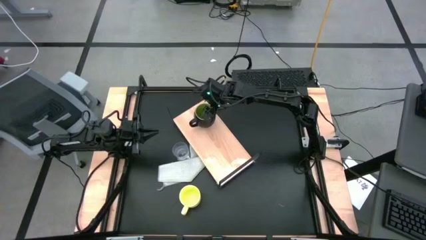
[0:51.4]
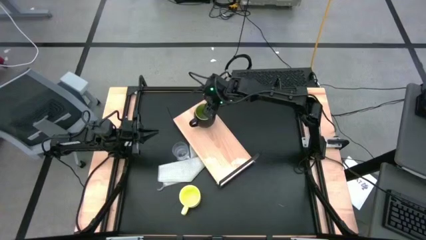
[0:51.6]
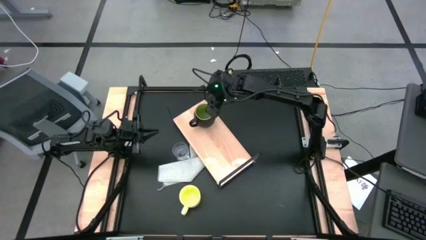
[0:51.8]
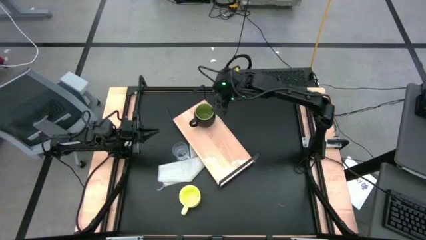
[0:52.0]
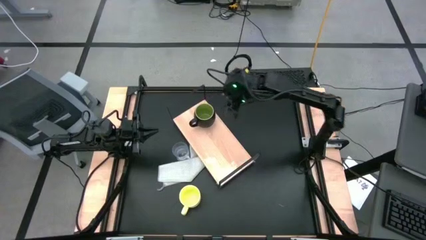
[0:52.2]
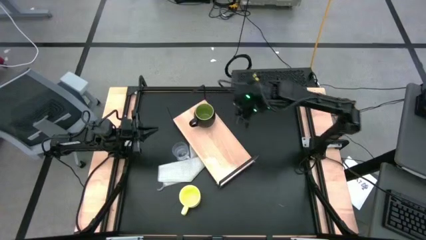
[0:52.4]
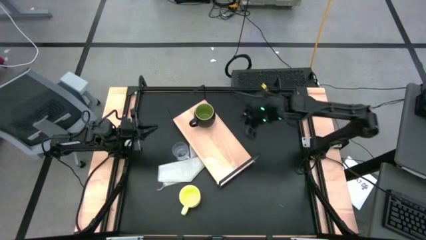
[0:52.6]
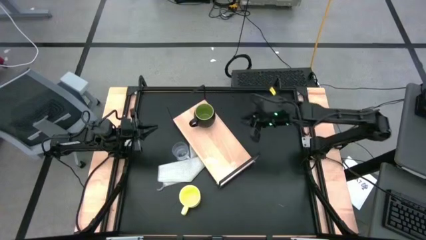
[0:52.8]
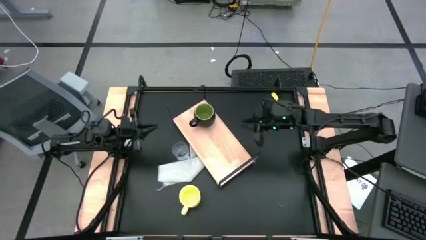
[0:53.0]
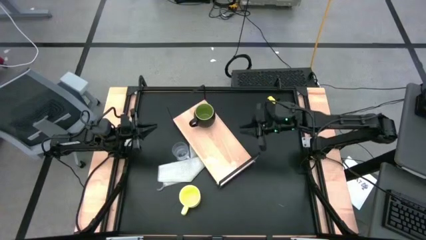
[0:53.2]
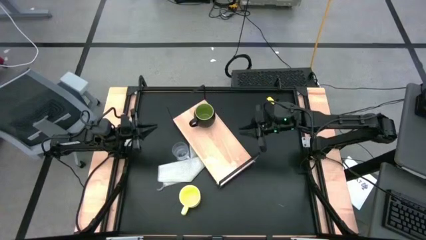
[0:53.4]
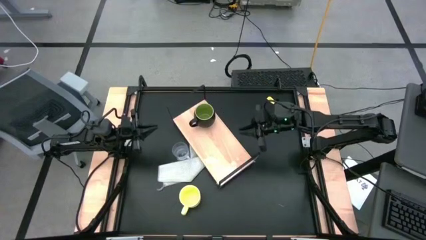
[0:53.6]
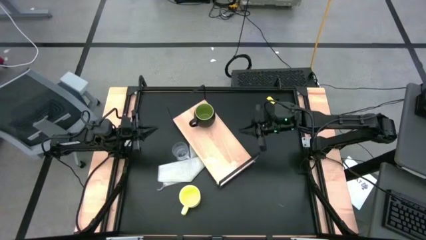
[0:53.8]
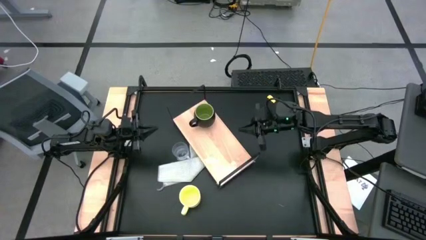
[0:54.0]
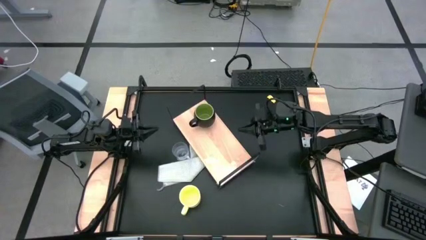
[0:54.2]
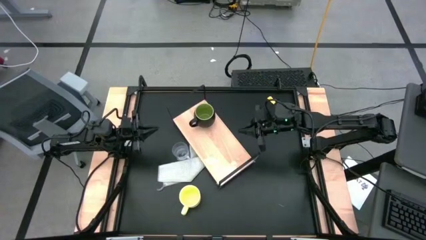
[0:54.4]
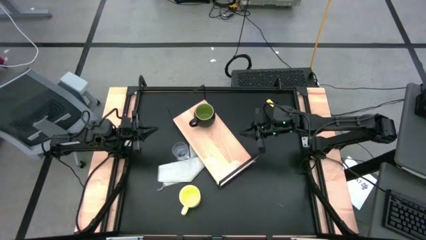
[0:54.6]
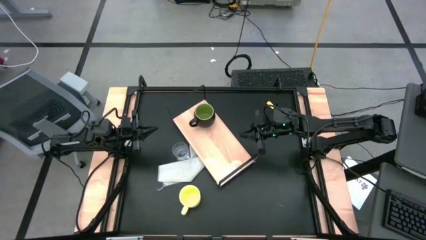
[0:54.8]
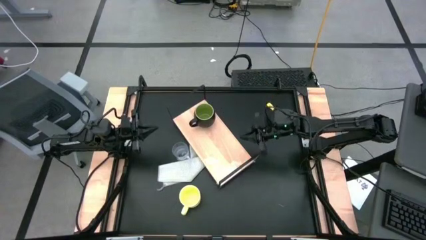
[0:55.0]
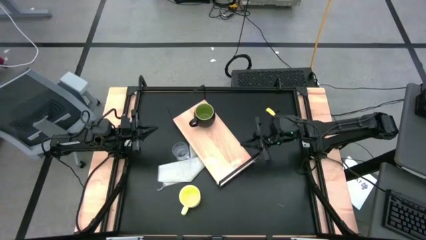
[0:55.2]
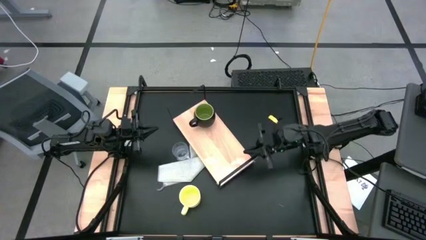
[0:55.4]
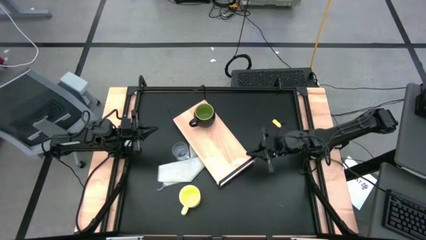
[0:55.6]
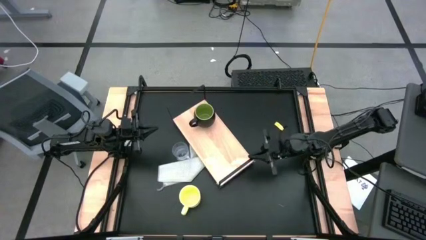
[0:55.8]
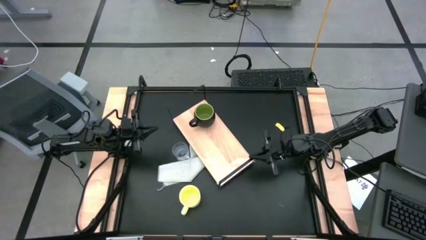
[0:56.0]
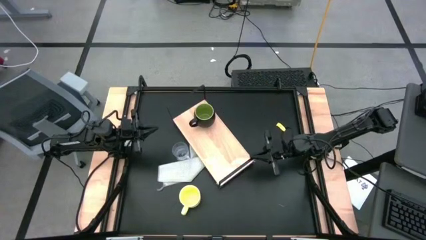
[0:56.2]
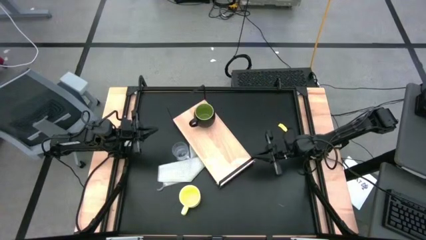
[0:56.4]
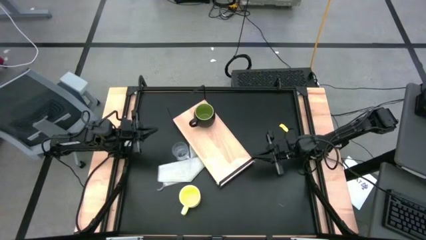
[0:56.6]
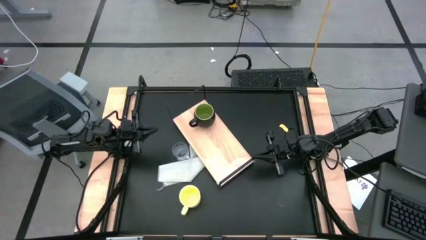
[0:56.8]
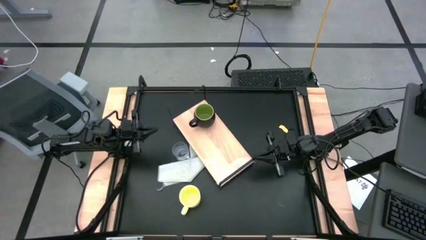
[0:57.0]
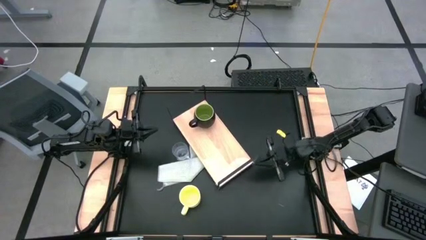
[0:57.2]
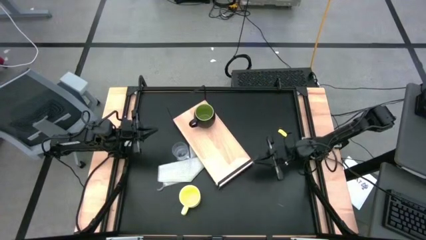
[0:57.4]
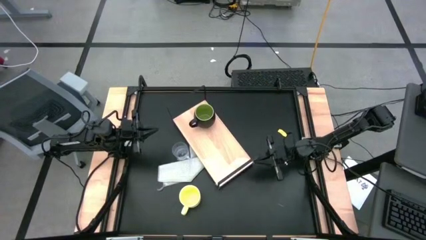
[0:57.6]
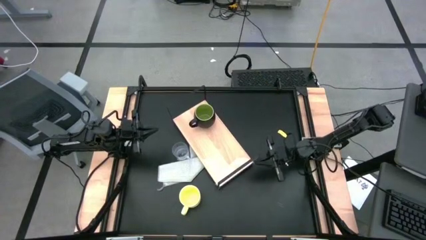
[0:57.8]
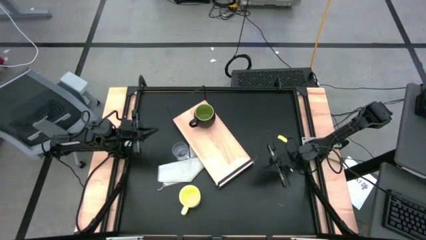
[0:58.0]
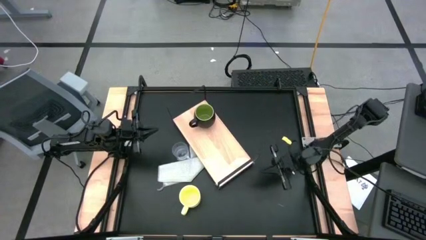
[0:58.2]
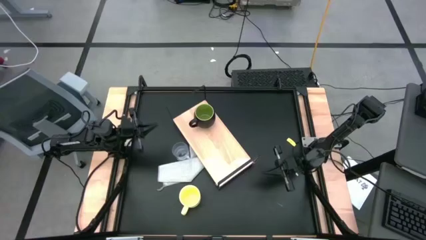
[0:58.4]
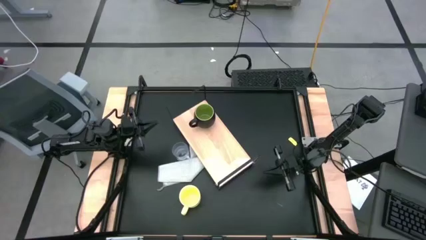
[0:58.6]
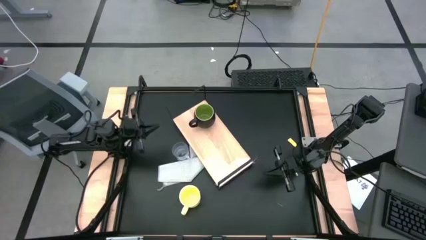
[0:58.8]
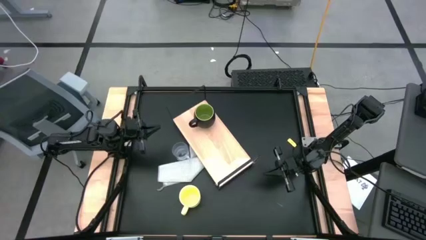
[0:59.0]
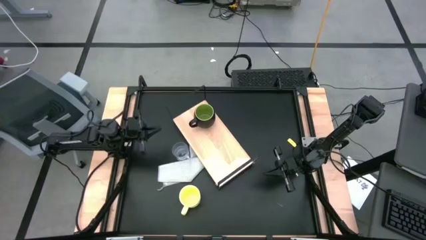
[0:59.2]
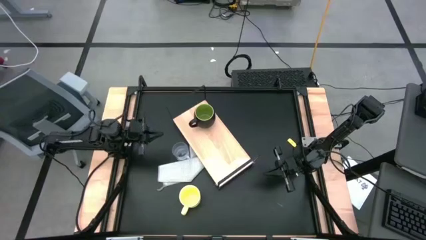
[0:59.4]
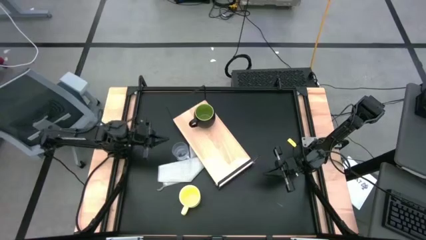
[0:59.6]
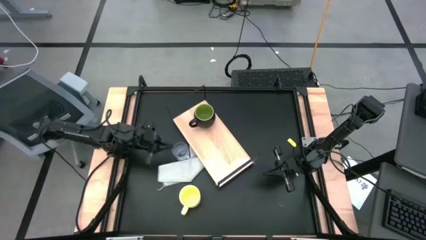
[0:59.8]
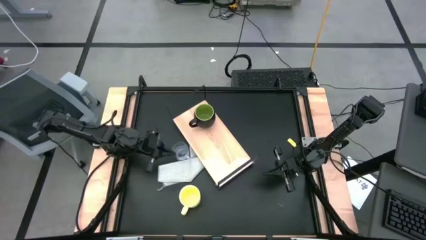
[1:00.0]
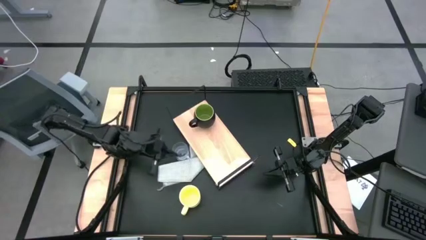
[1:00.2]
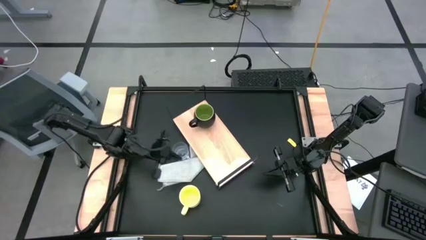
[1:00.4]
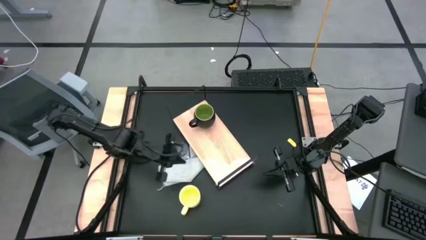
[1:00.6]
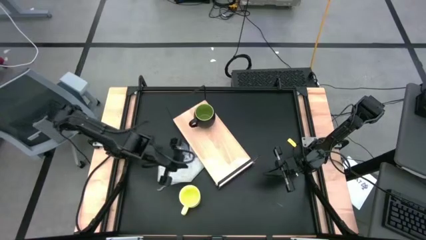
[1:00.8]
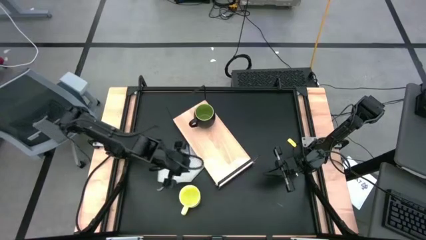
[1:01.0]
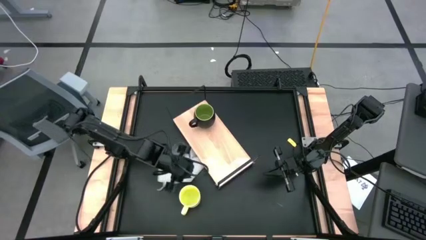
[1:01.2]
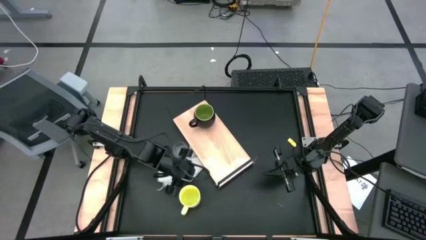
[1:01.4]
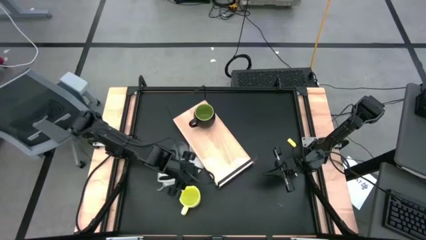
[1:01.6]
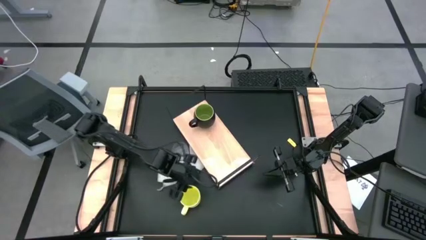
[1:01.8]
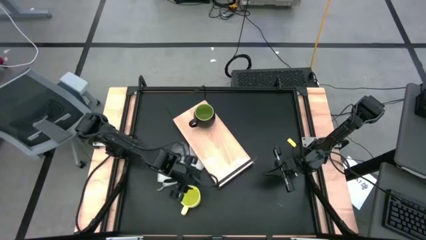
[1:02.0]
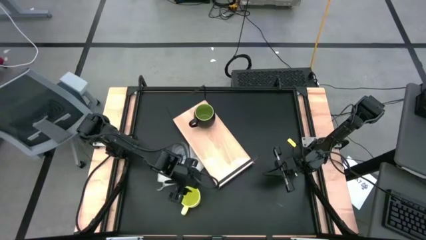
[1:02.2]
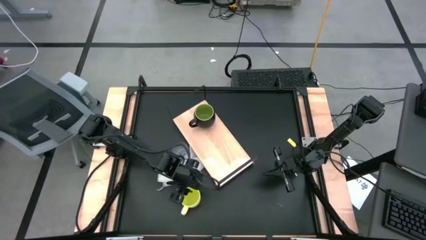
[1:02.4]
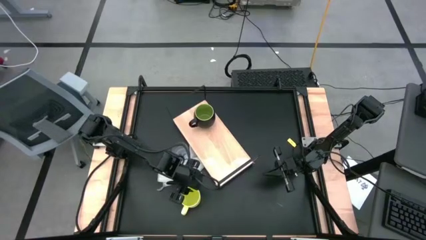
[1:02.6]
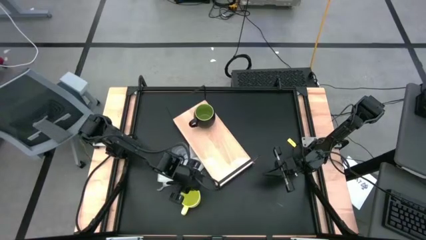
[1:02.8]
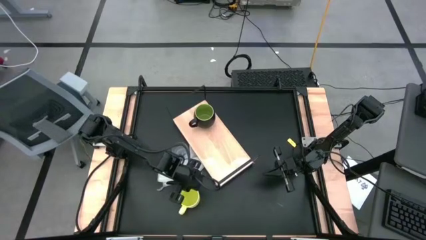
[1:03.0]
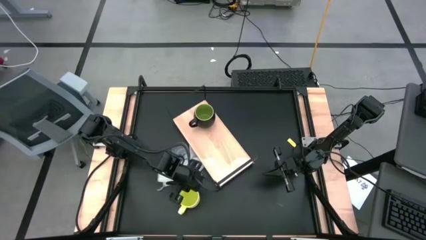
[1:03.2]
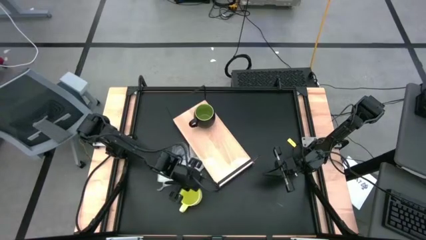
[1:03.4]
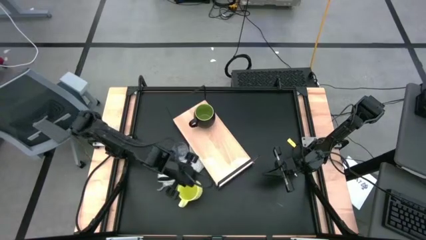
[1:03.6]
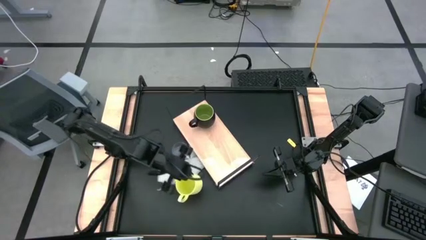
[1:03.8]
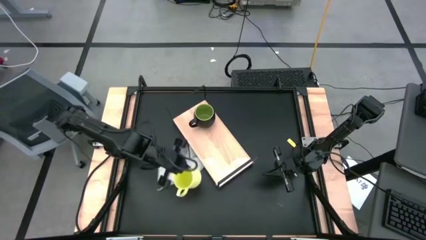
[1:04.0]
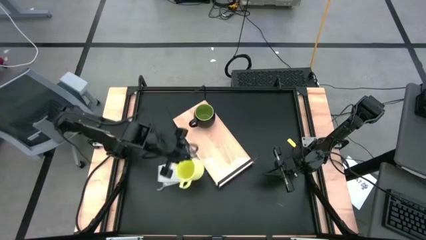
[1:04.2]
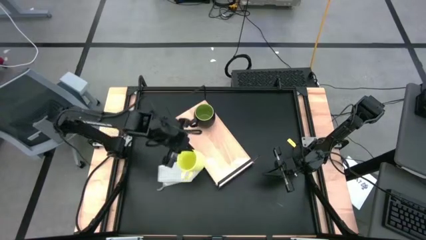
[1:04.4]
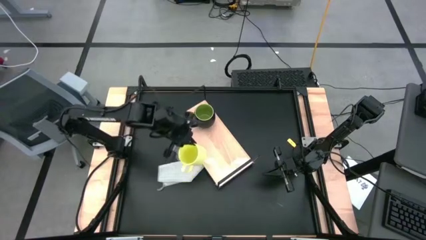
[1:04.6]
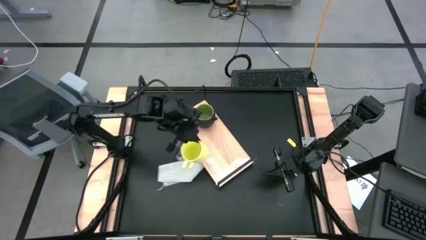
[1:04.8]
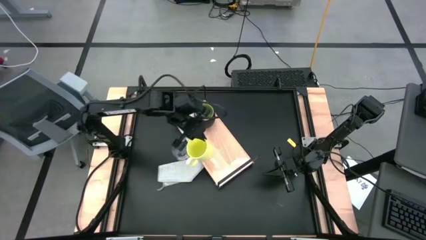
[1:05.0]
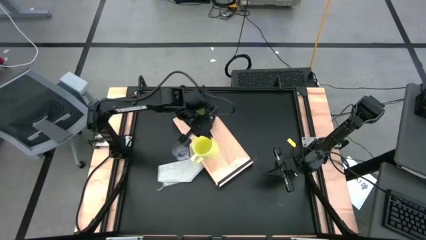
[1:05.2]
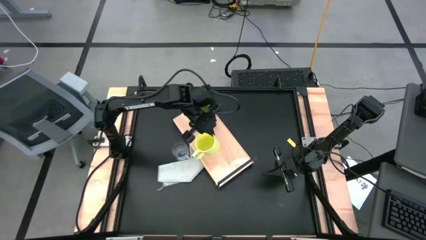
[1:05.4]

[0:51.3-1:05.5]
Task: Stack small to large cups/mugs on shelf
Put the yellow mug on the shelf

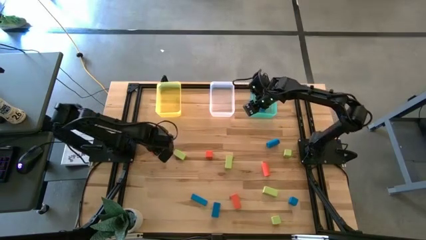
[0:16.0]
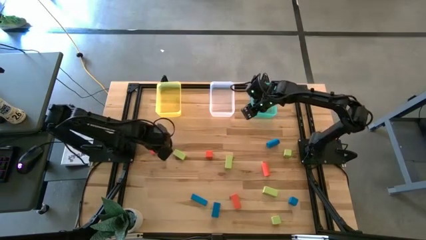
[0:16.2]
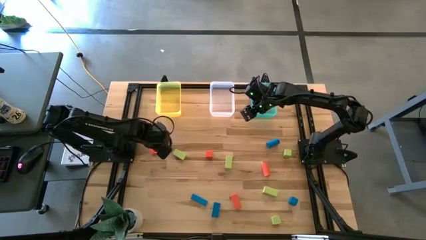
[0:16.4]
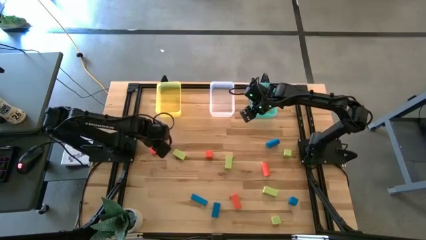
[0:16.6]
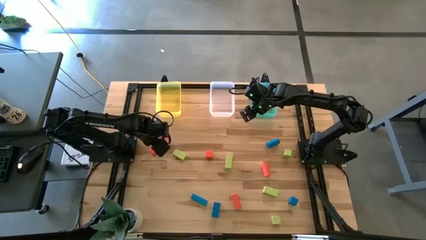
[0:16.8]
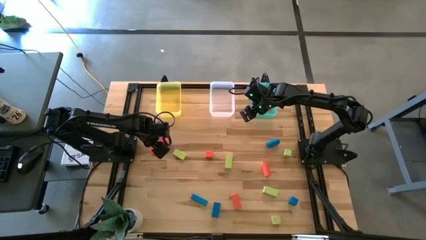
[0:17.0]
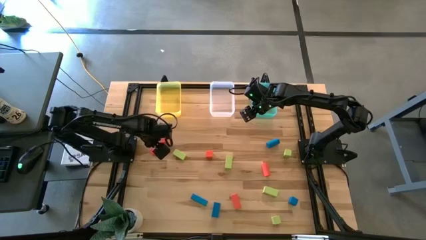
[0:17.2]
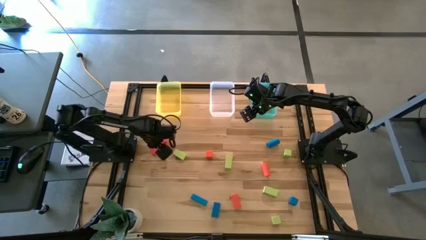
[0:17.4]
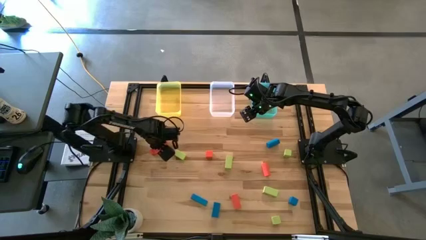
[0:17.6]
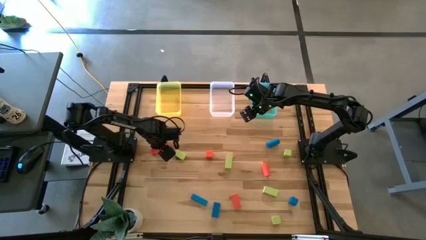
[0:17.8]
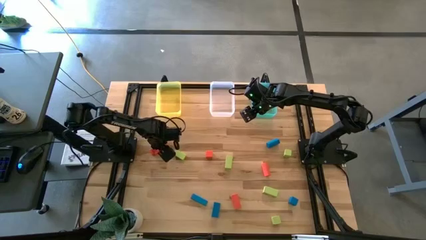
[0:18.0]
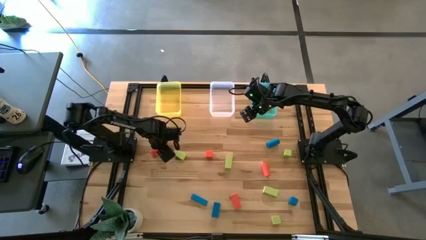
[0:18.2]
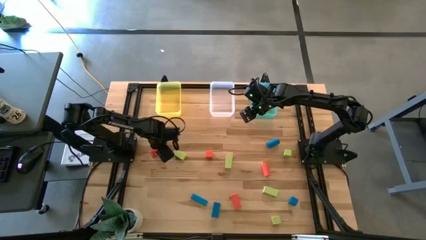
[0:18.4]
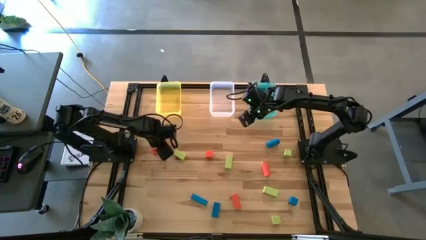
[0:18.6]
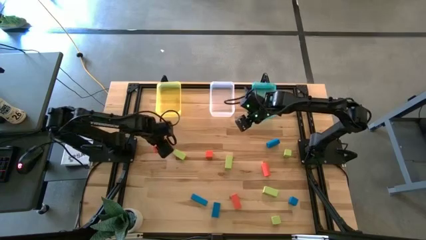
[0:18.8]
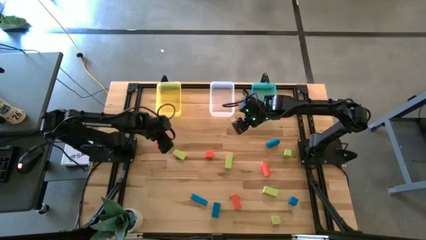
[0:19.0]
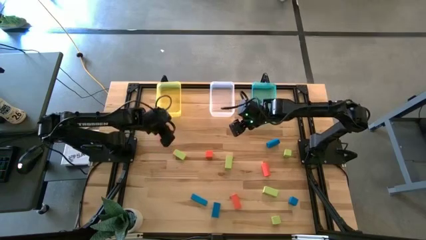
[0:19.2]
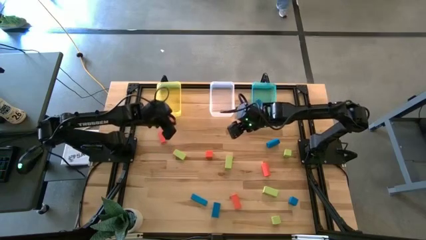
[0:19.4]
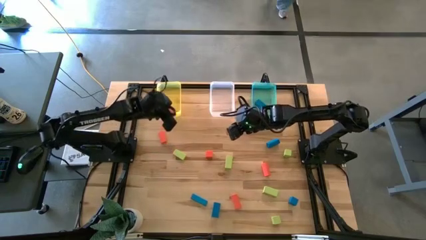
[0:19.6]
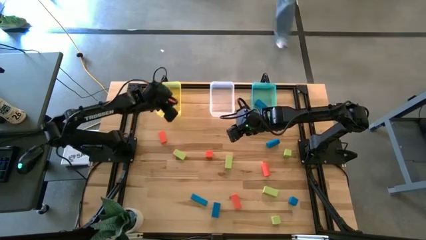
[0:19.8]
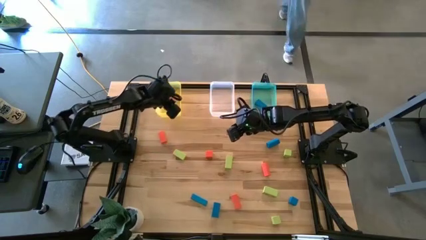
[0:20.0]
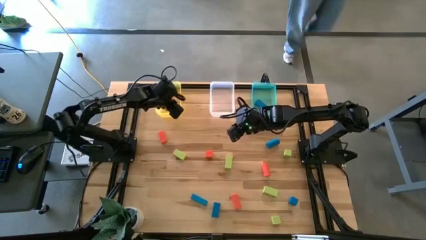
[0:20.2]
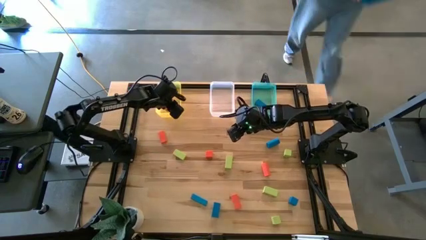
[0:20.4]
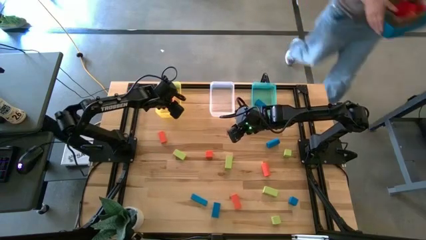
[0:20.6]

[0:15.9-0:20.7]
Task: Sort & place blocks by color
Put the orange block into the yellow bin
